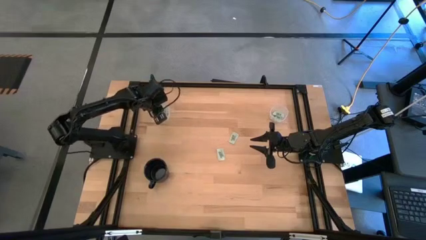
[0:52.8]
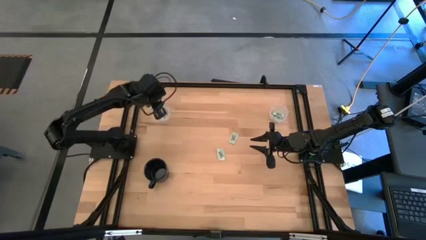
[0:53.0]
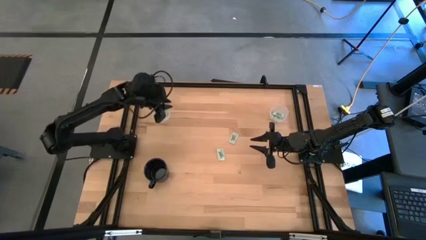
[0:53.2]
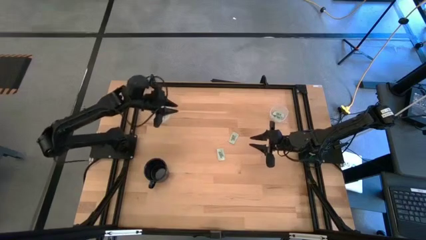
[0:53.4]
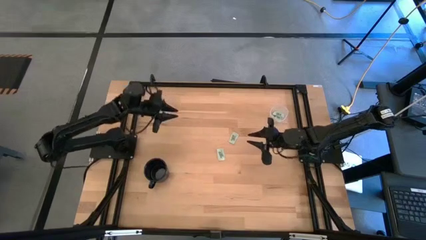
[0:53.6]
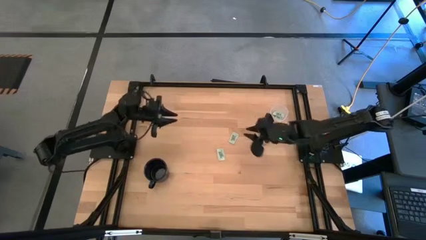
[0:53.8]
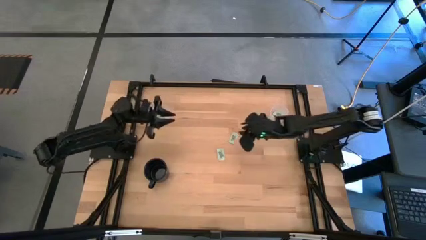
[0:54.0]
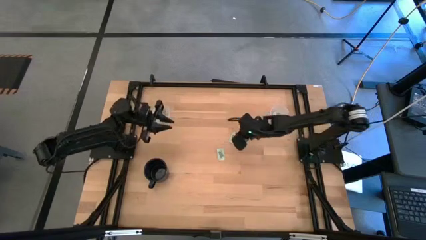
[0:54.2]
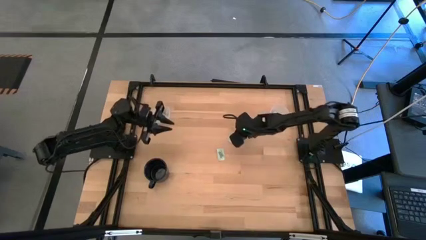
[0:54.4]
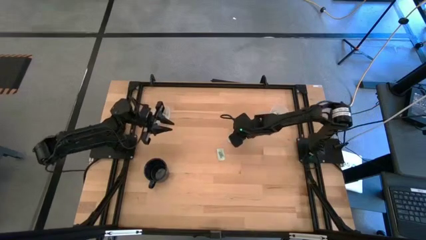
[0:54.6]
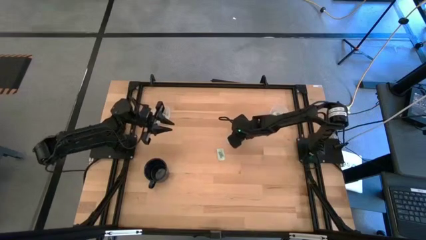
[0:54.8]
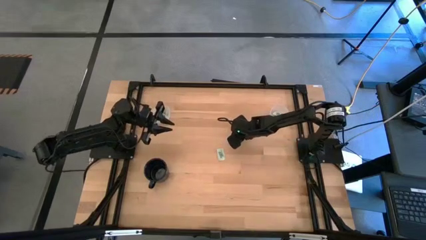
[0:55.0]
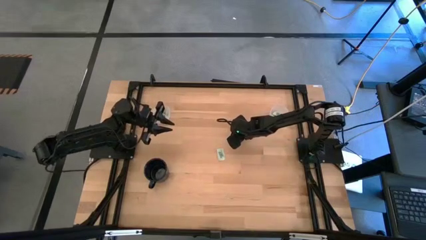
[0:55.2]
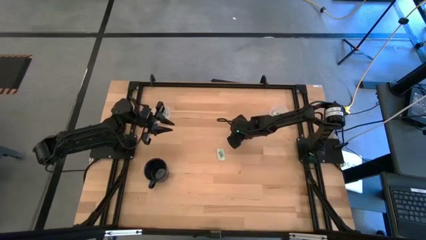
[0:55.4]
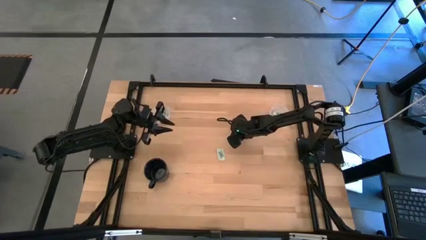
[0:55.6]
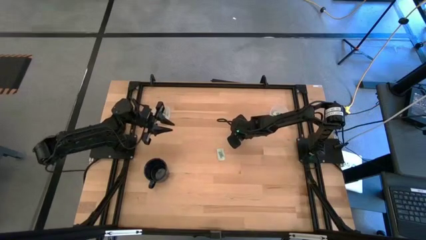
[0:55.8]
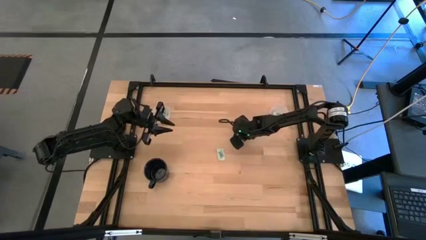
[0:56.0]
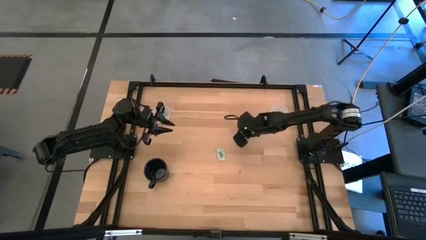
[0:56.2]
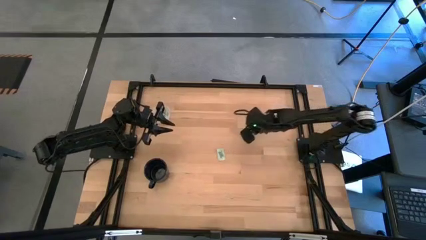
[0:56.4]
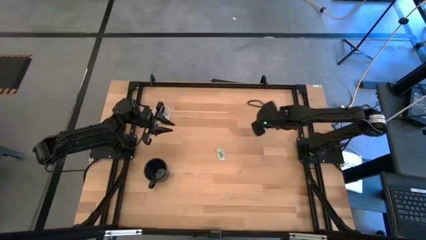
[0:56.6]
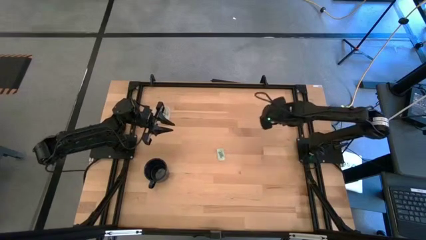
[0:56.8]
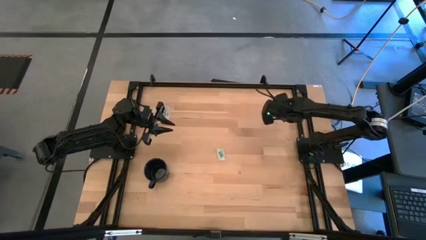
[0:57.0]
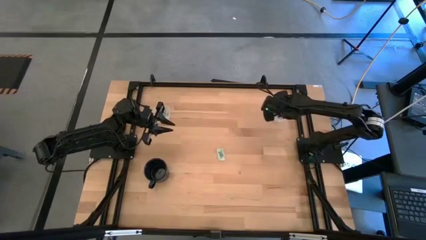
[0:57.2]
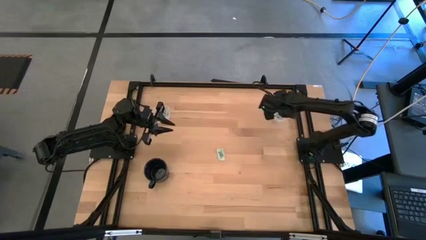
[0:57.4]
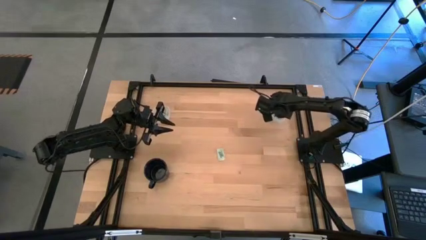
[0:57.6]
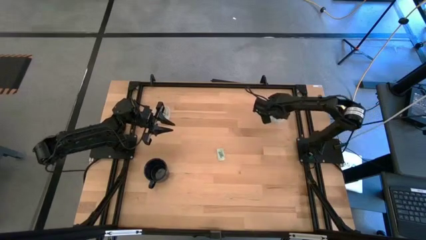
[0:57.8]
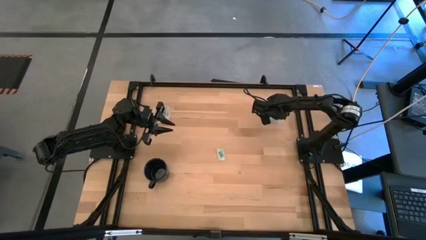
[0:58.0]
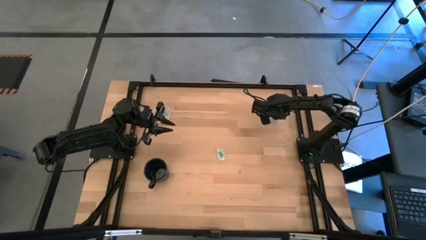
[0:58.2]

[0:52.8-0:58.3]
Task: Pick and place Stevia / Truvia into bins
Put the stevia packet into the right transparent container

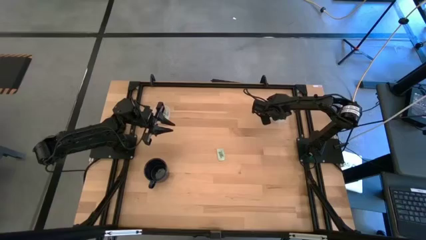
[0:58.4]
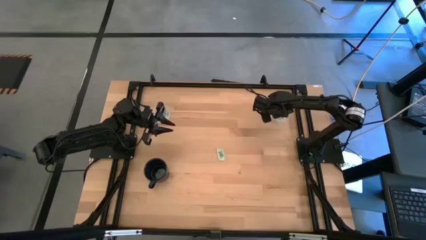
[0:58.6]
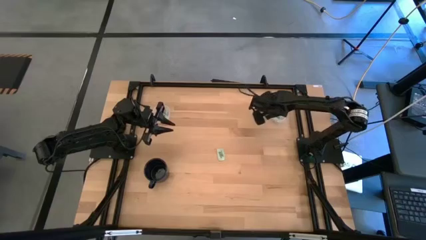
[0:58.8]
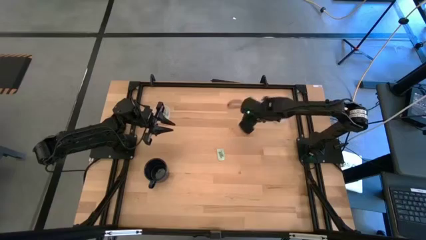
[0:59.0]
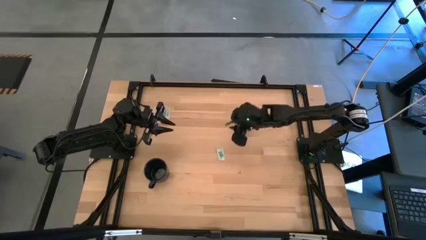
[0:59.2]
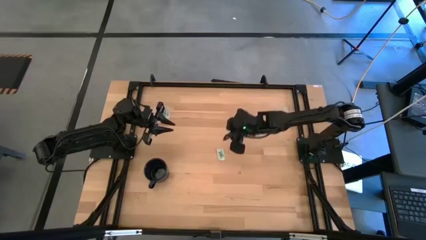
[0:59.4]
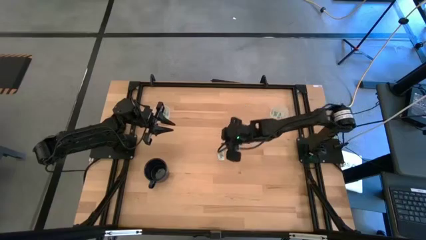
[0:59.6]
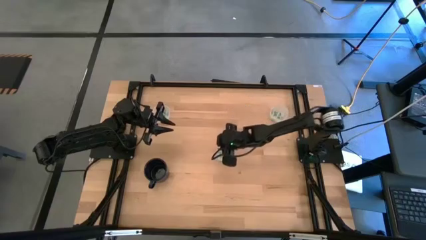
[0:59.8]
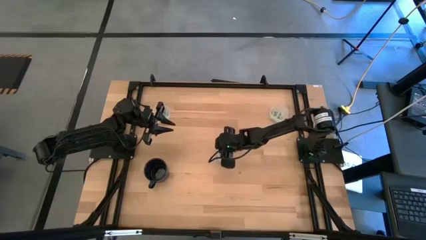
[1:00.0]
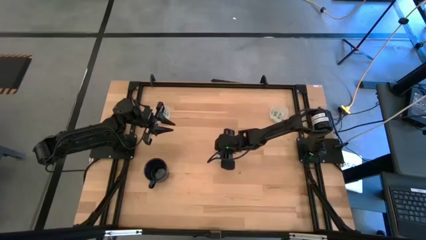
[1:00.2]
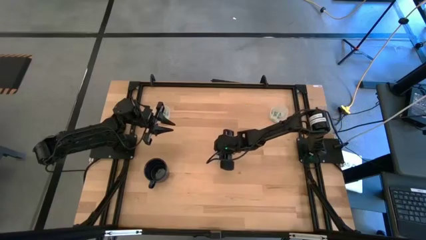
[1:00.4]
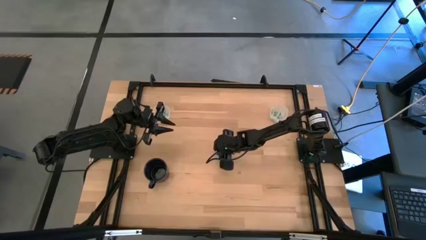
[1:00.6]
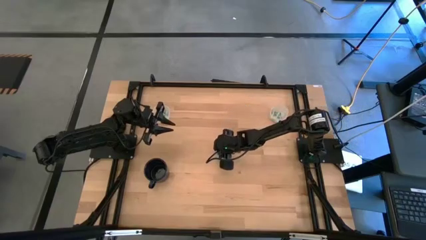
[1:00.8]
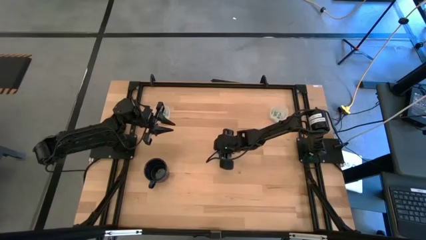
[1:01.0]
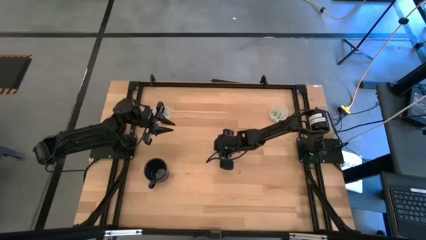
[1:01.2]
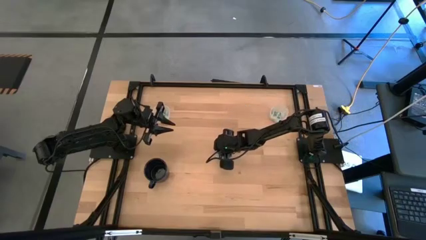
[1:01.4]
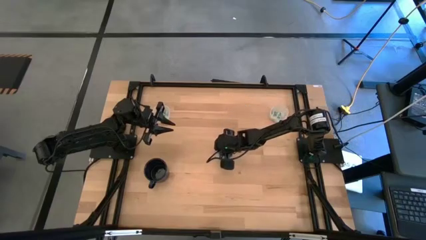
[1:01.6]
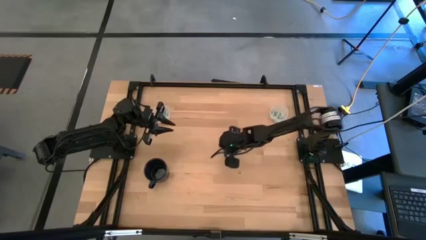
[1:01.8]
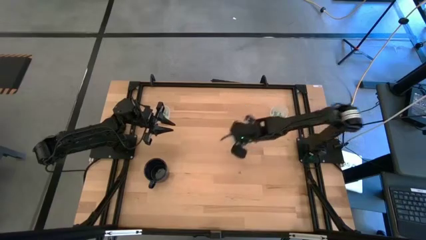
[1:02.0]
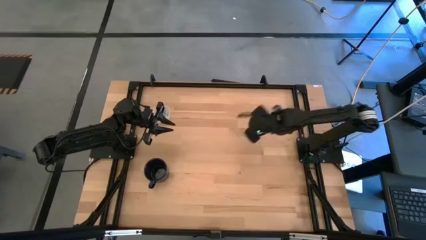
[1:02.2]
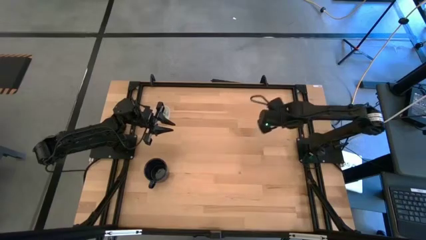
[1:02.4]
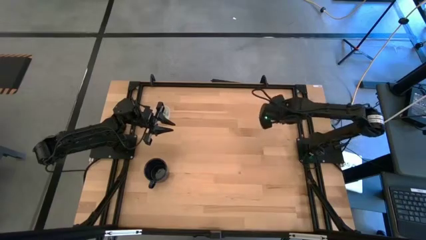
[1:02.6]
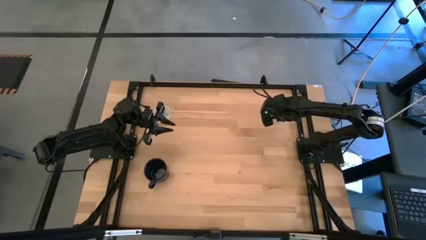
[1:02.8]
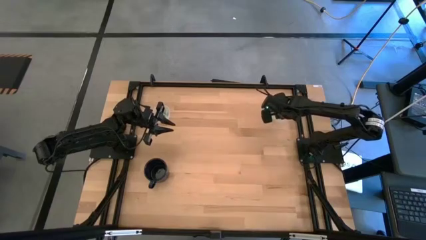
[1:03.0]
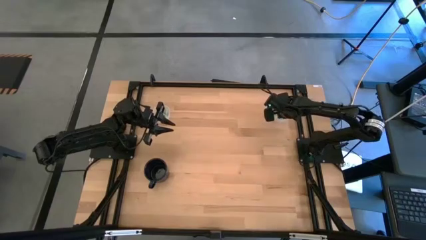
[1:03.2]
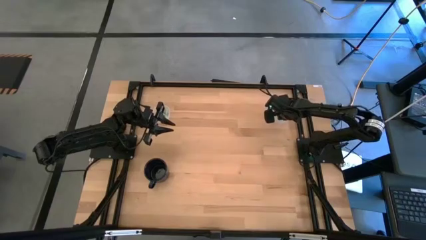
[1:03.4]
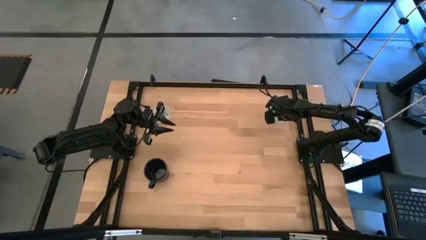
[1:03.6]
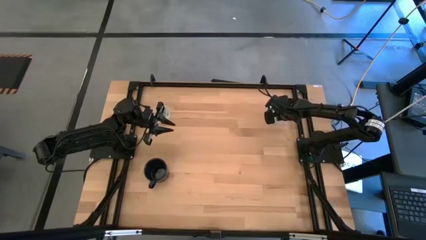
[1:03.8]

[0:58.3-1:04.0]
Put the stevia packet into the right transparent container

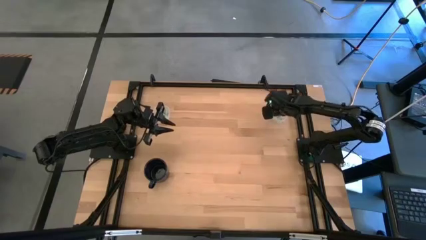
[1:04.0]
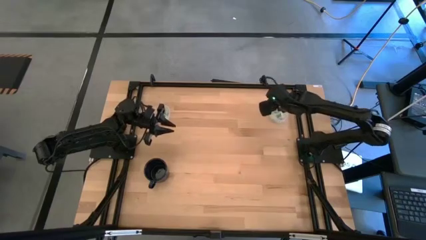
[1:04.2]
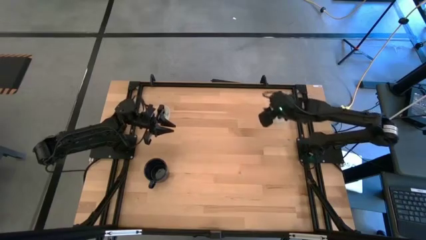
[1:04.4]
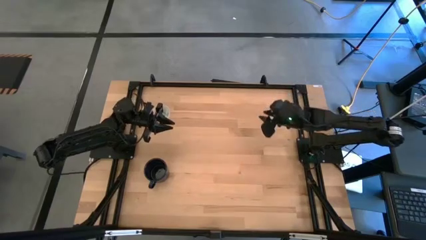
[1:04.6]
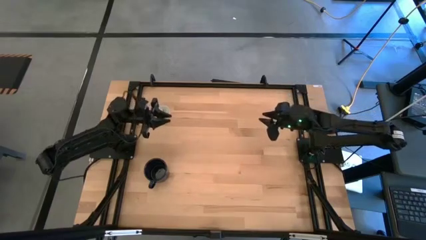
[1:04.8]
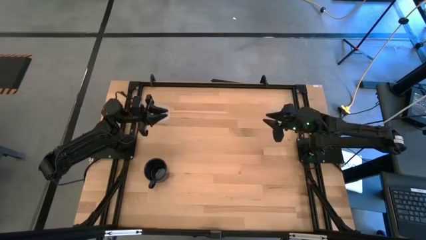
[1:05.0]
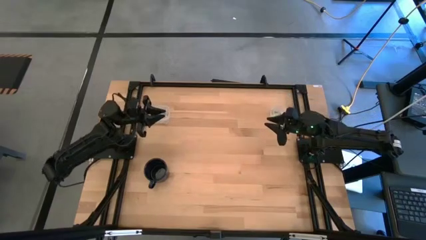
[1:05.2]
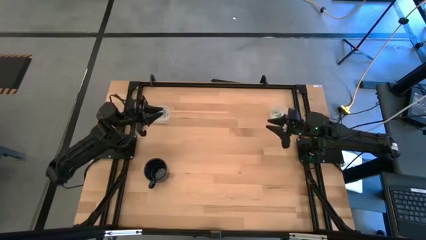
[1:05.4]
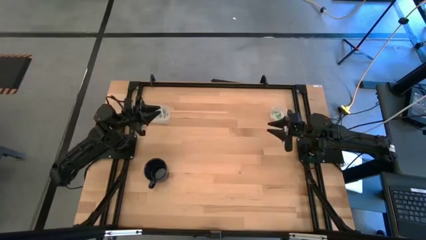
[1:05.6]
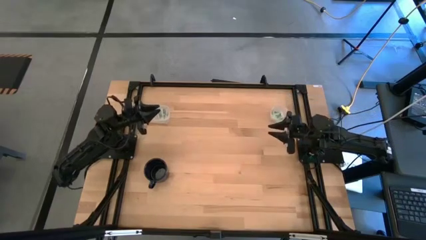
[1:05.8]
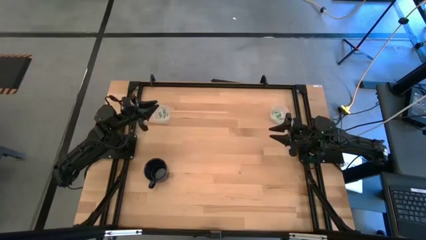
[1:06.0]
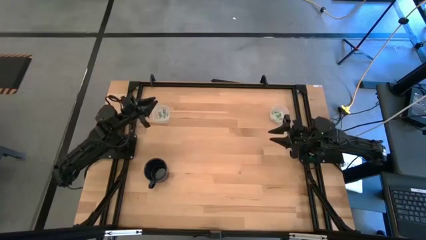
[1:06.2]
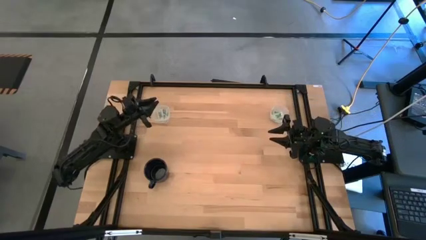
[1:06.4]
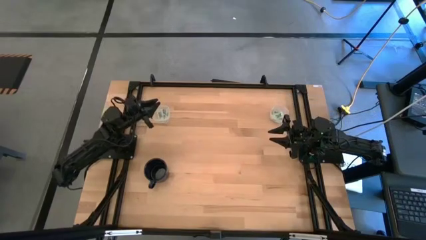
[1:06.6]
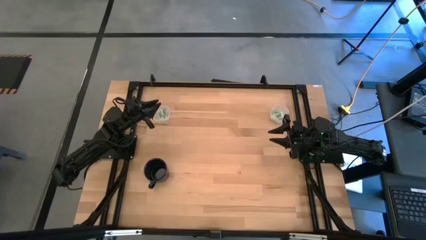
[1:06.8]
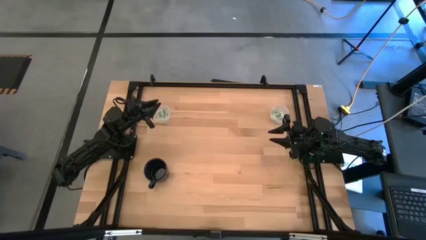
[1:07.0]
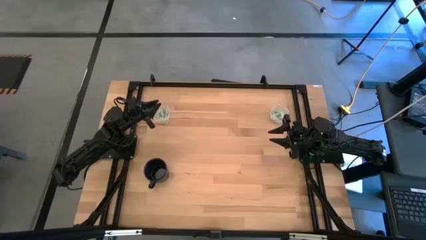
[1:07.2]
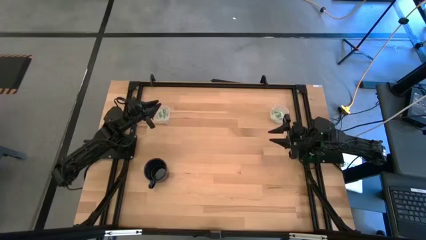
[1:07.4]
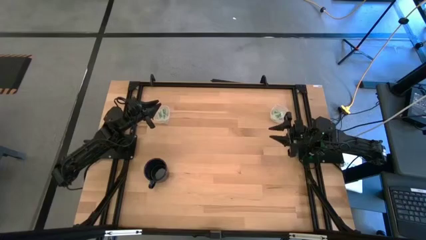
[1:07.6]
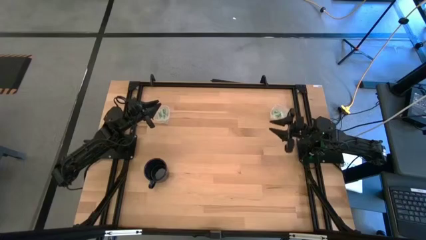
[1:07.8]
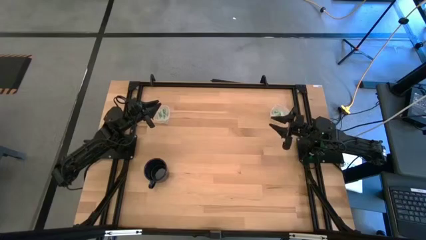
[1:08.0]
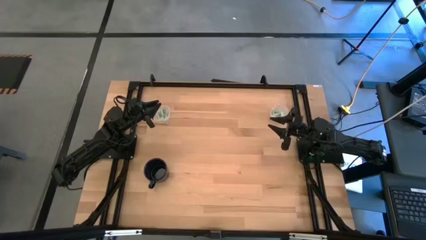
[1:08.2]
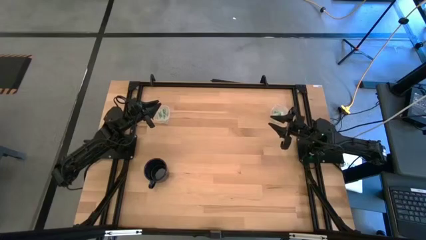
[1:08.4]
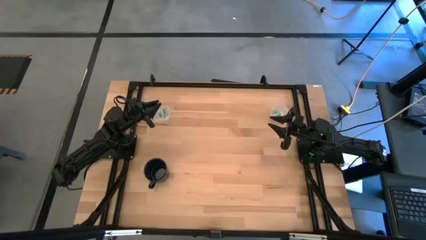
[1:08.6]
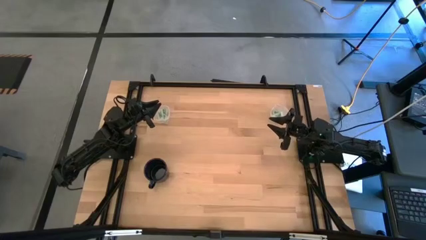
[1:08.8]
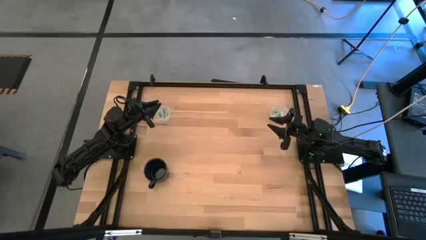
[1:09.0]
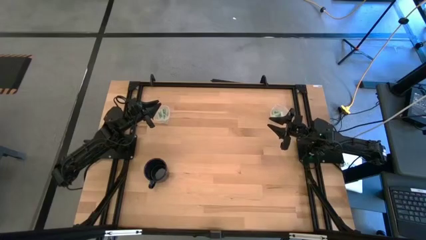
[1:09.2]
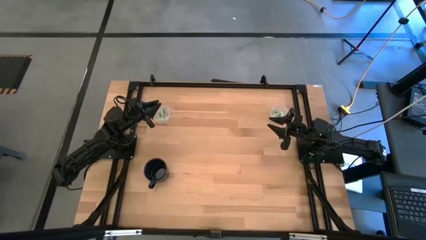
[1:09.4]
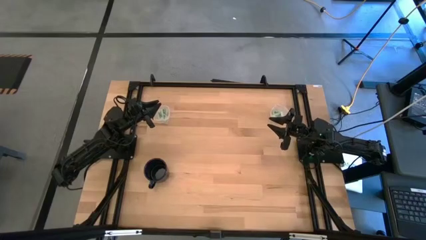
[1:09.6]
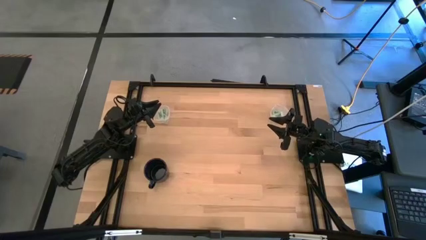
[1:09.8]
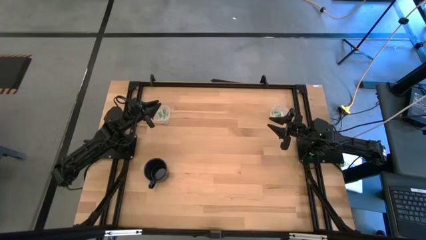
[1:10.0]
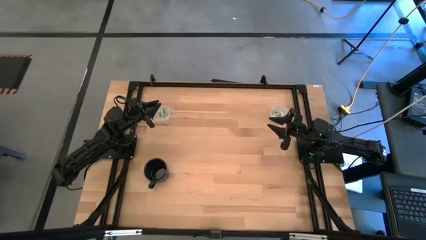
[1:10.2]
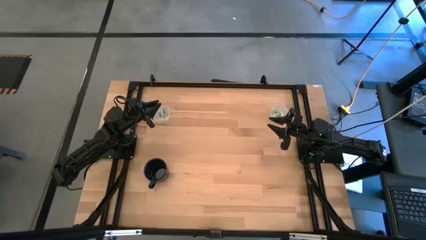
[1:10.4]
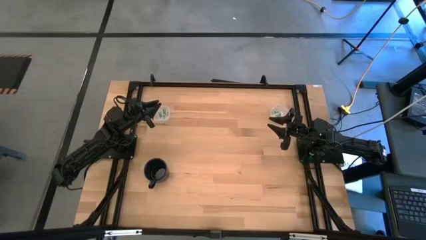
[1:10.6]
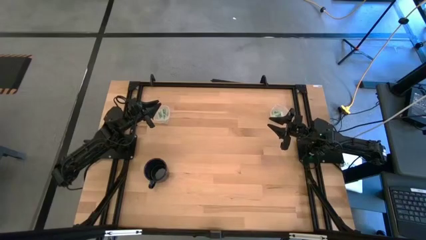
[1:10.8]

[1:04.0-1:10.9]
Return to Home Position
